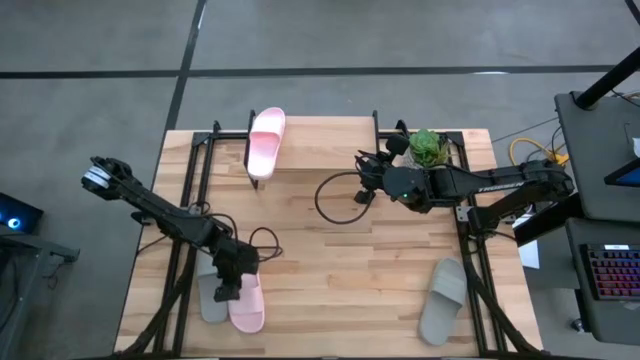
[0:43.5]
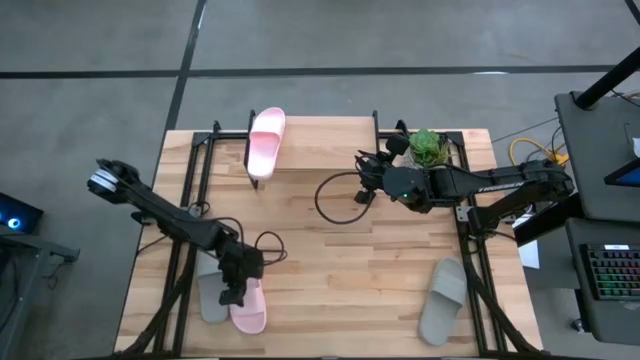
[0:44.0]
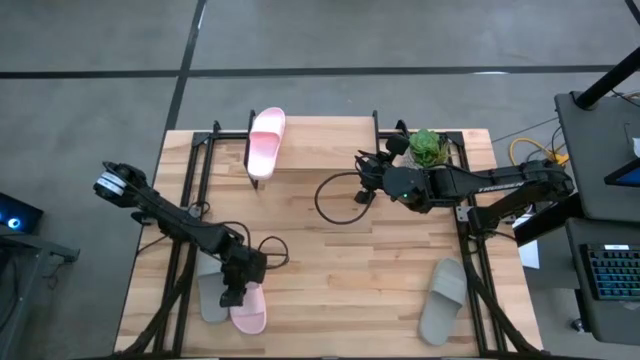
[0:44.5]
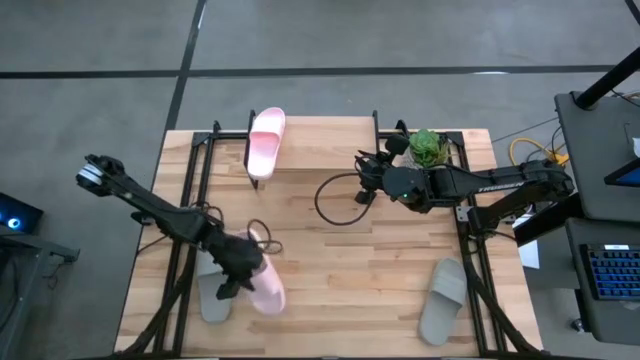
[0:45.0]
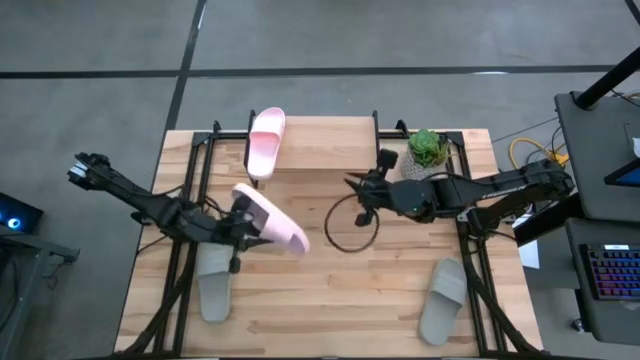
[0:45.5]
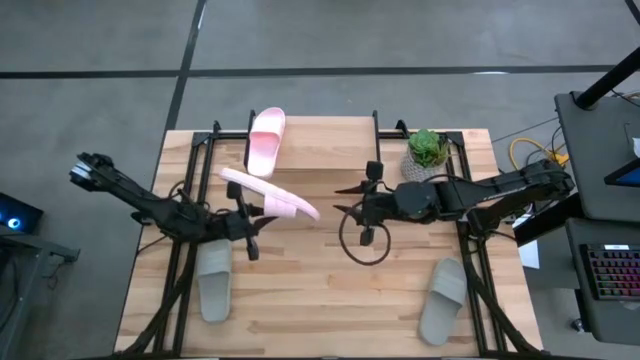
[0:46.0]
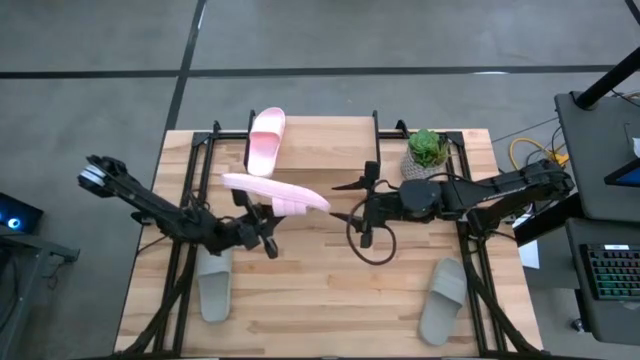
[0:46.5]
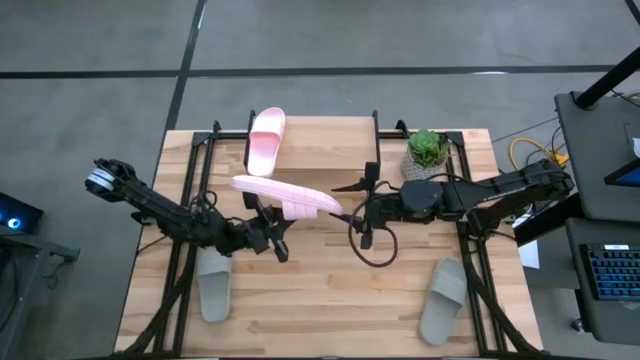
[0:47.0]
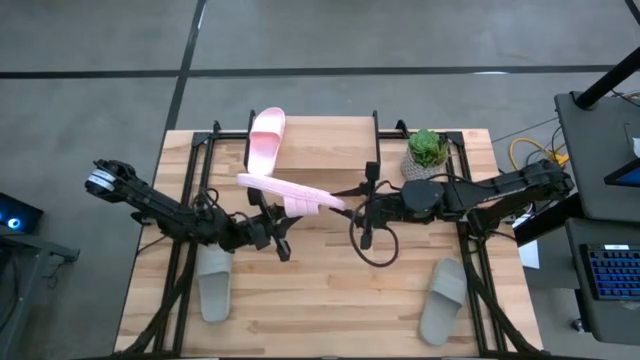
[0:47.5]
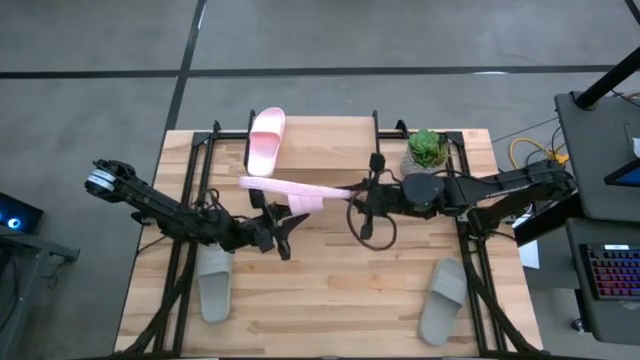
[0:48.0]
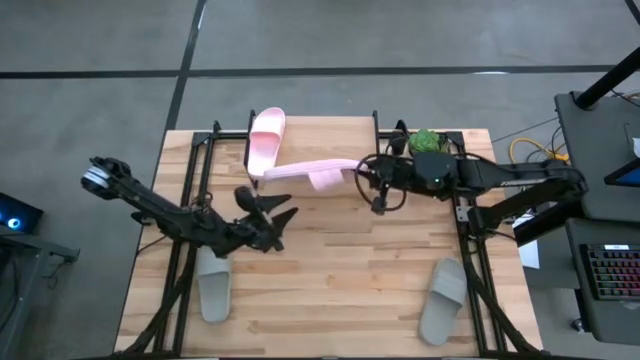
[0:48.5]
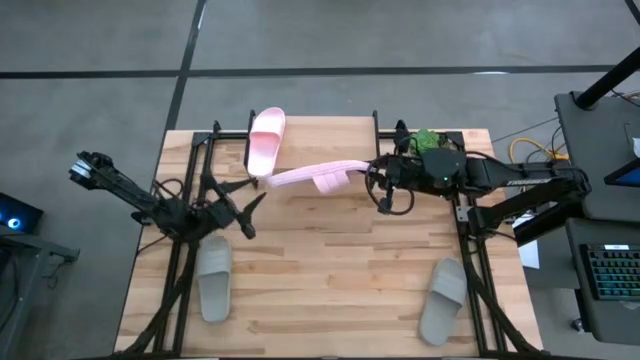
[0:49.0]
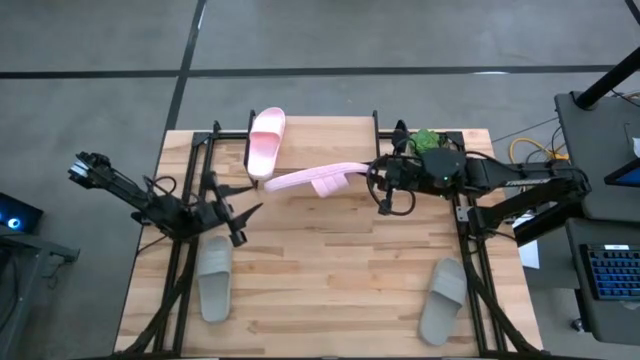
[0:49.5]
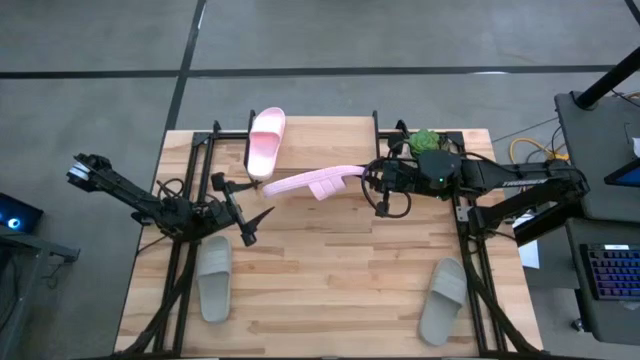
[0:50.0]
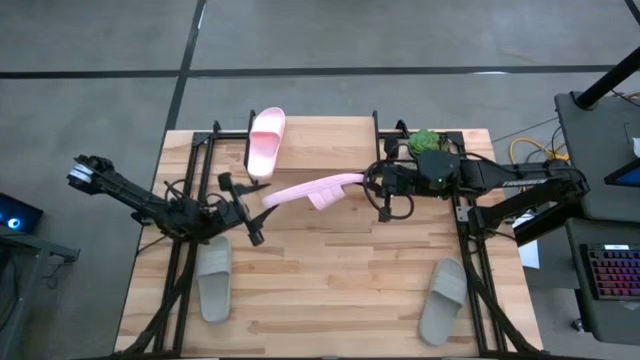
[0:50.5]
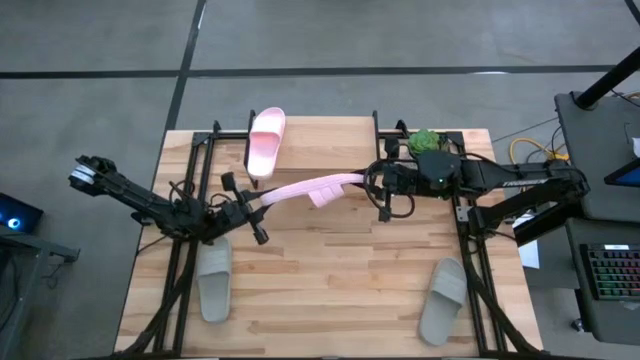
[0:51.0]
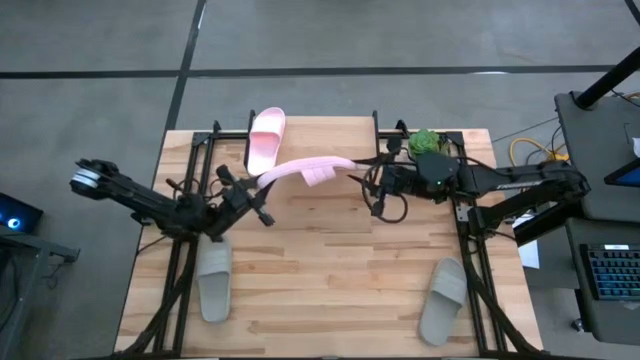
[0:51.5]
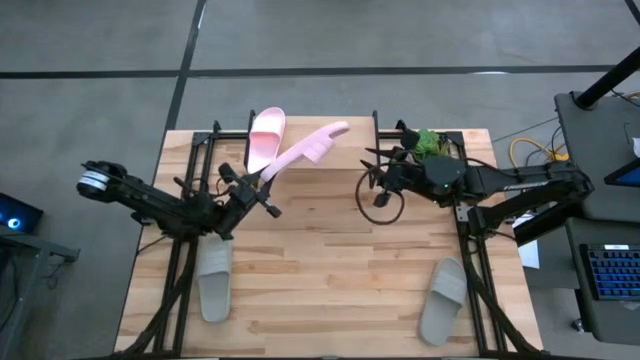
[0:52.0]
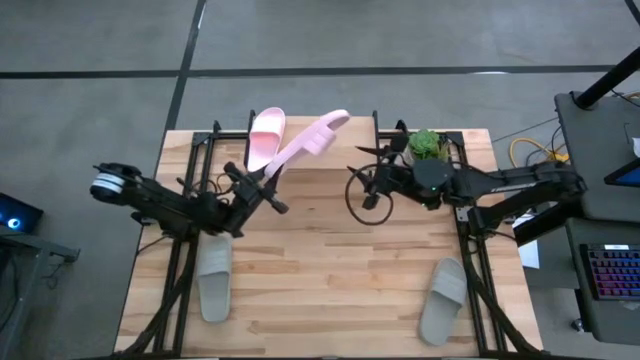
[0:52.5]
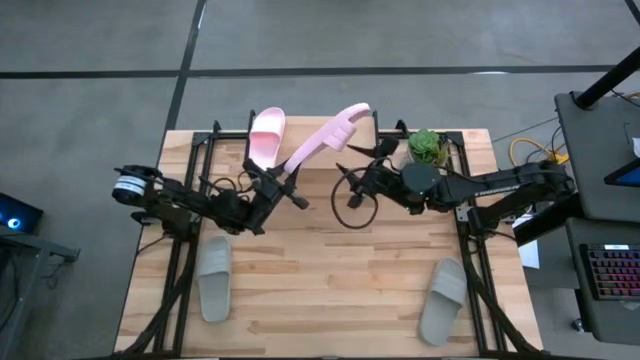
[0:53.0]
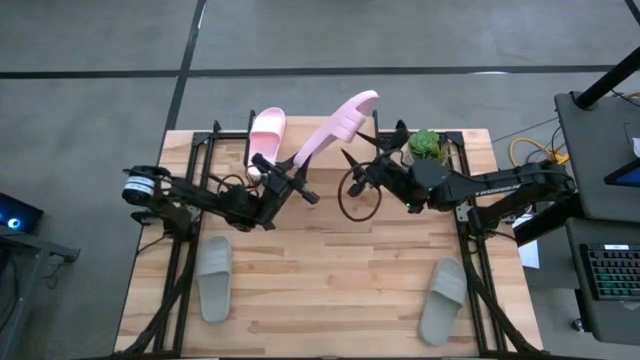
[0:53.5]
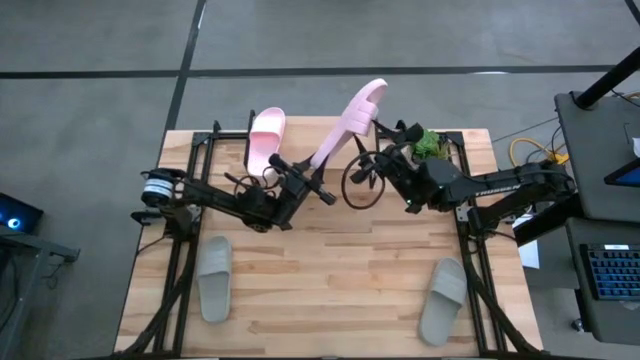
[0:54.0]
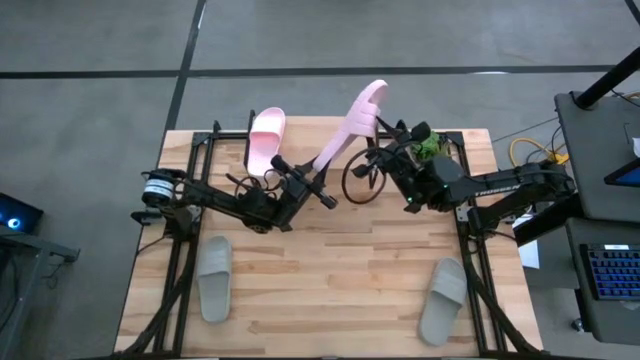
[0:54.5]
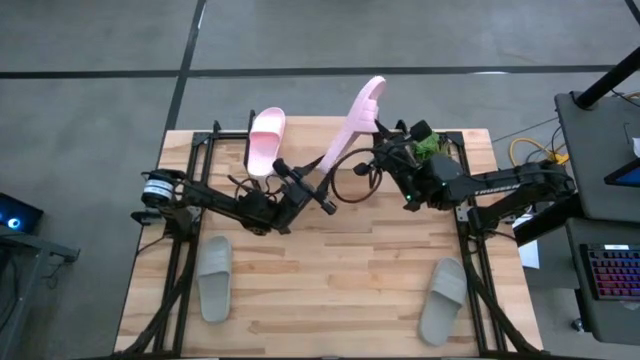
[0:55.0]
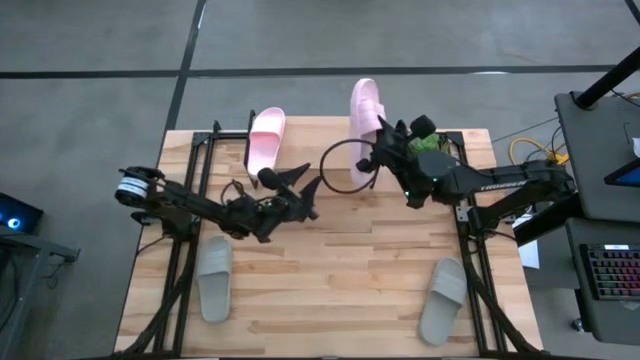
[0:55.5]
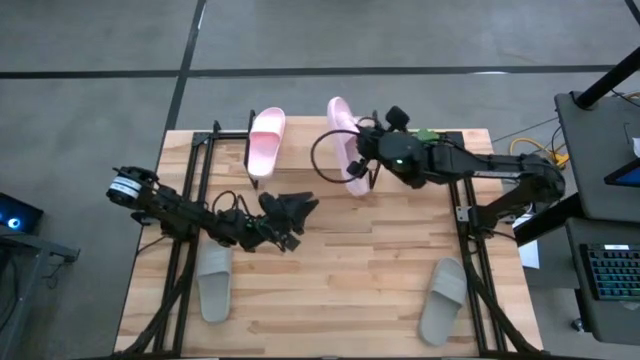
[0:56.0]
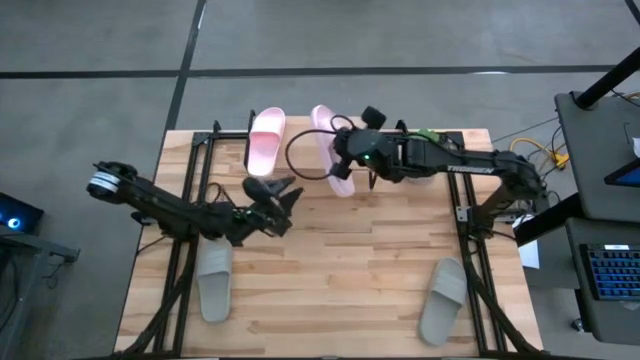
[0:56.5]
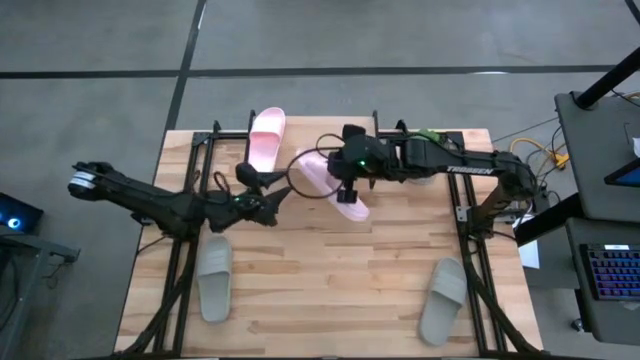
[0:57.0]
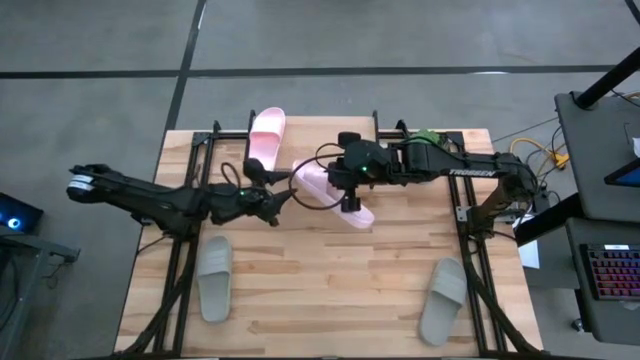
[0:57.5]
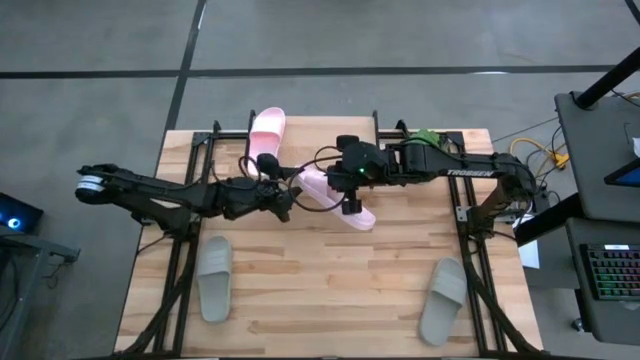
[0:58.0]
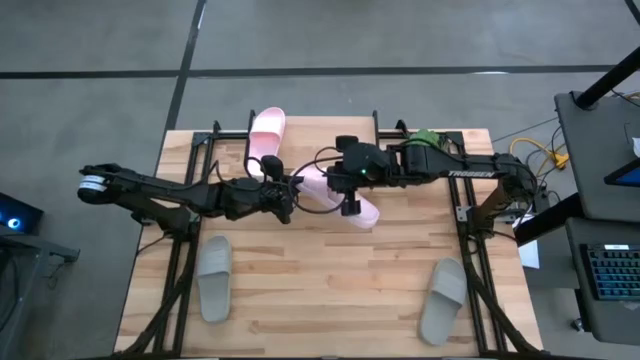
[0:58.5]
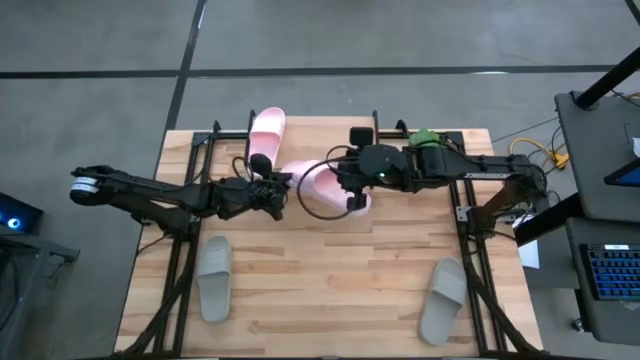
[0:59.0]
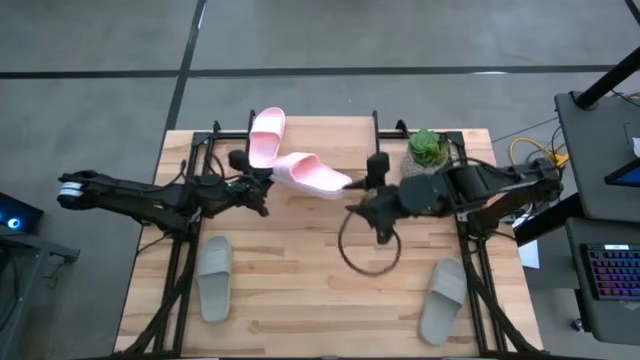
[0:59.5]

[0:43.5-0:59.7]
Task: Pick and place slides into the shelf
Put the pink slipper on the shelf

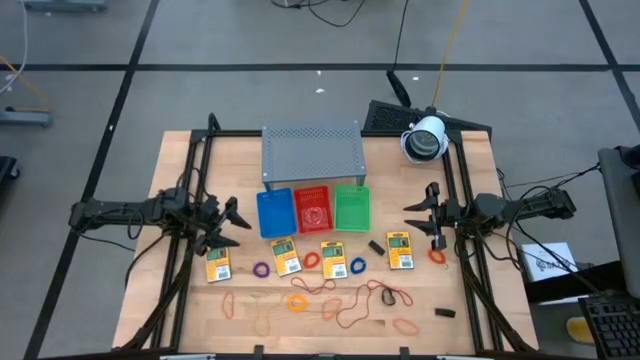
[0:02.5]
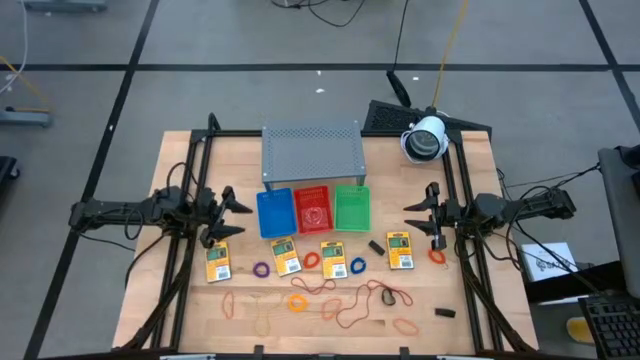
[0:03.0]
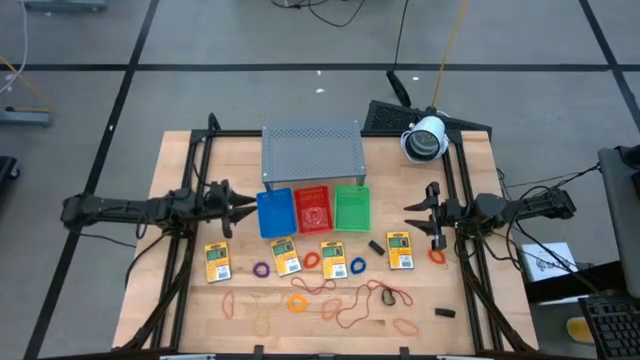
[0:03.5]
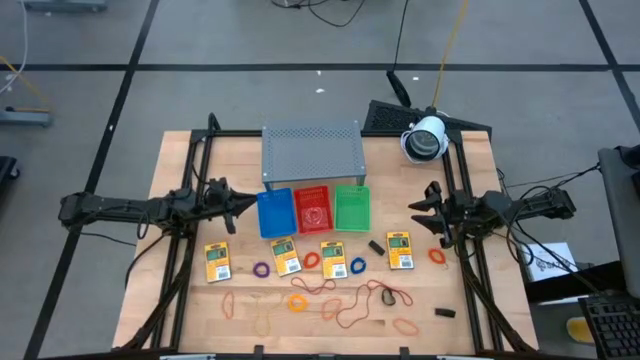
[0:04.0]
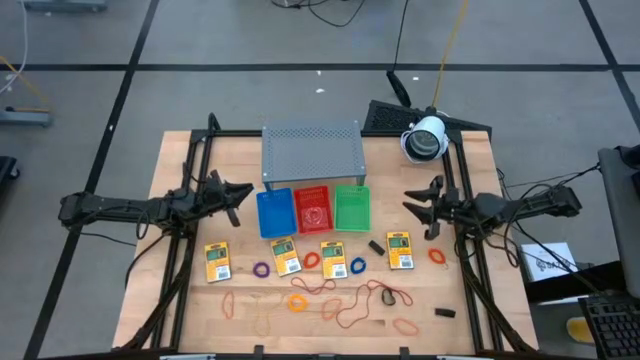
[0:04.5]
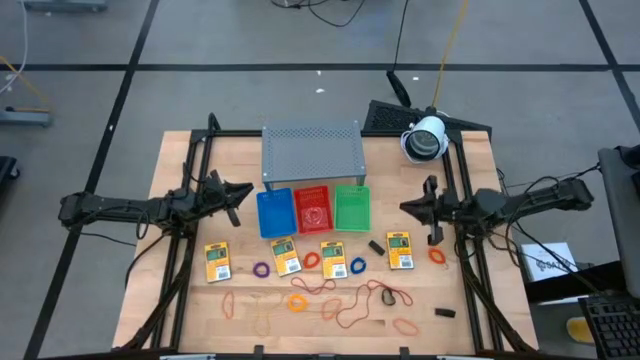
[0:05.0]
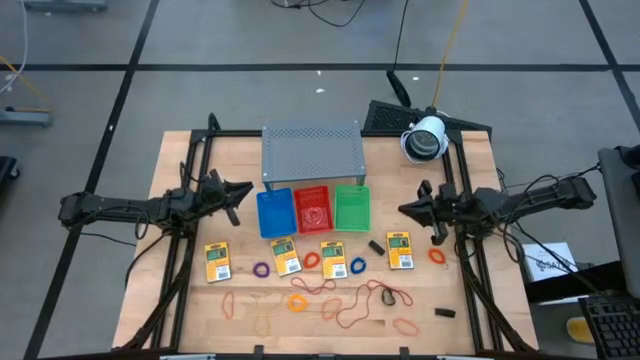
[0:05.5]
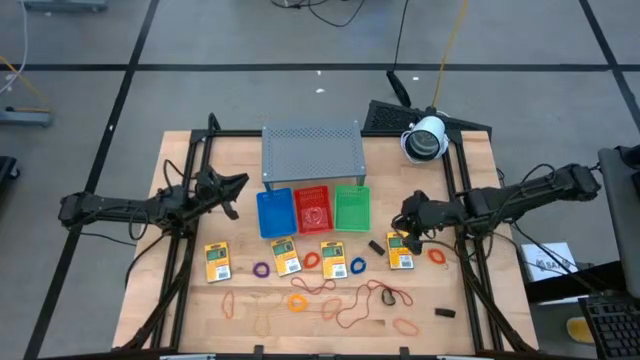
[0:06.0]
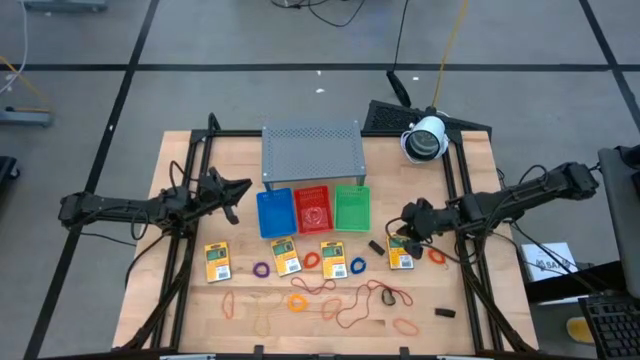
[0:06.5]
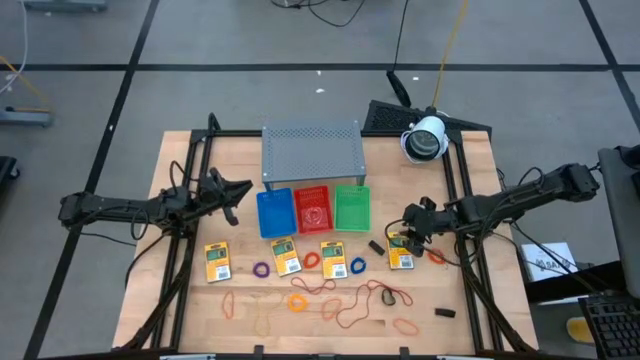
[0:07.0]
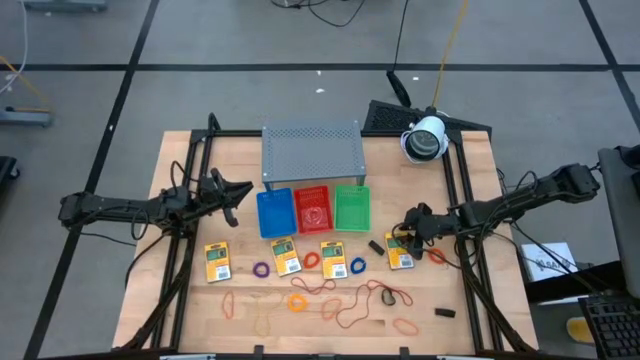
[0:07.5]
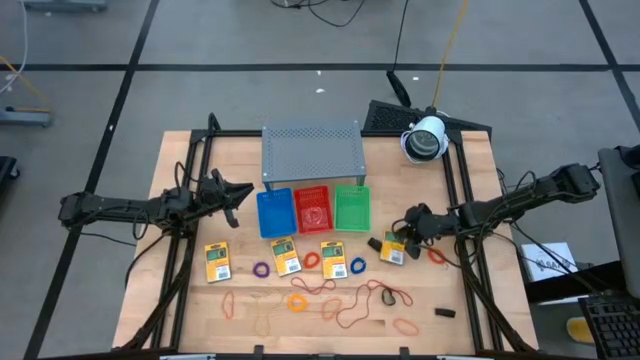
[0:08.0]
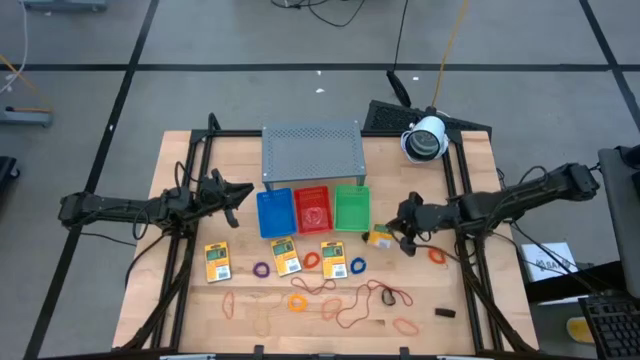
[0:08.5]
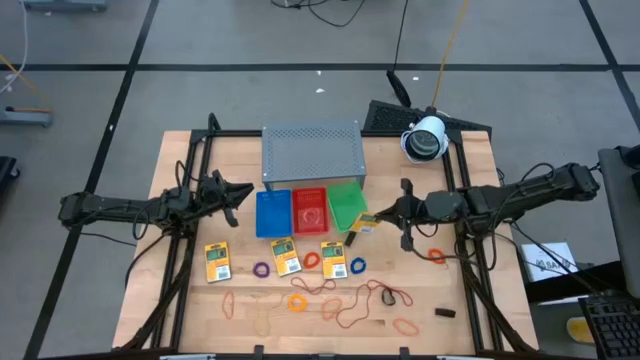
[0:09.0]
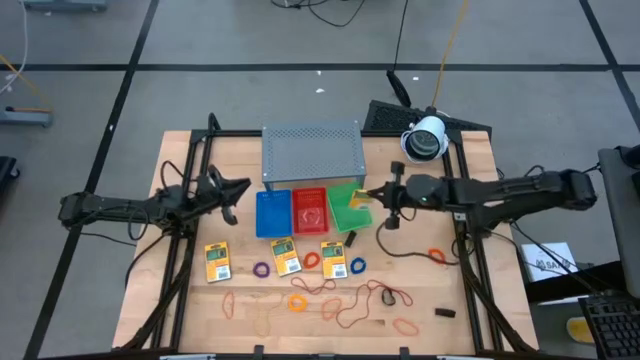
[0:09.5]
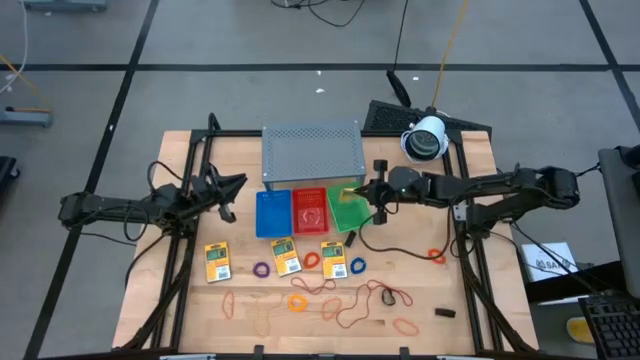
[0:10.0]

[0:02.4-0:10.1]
Task: Pick & Place Office Desk Supplies
Put the crayons into the green bin
